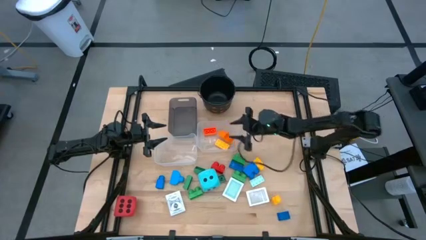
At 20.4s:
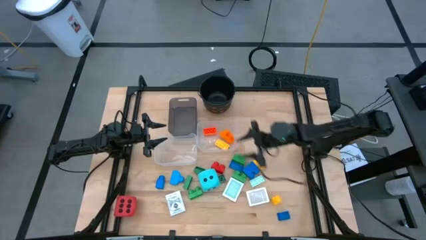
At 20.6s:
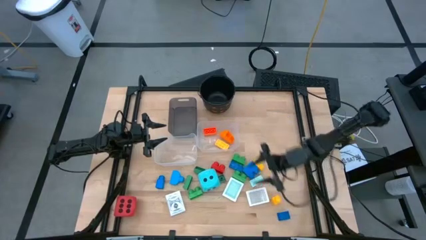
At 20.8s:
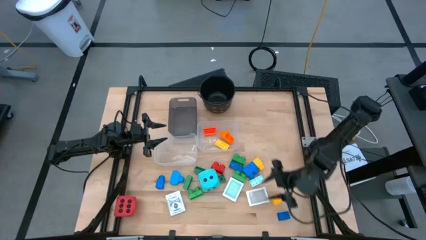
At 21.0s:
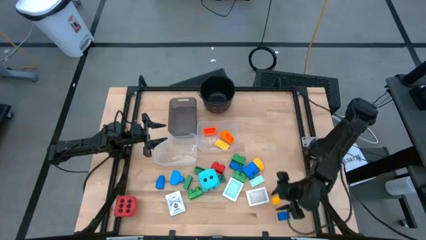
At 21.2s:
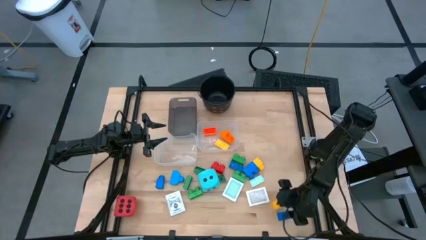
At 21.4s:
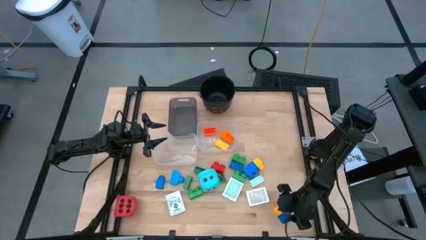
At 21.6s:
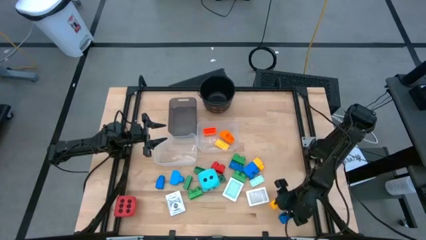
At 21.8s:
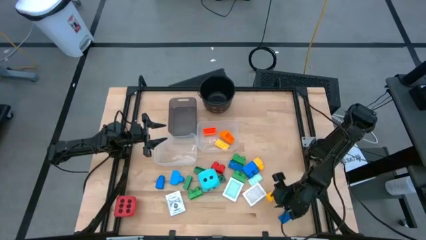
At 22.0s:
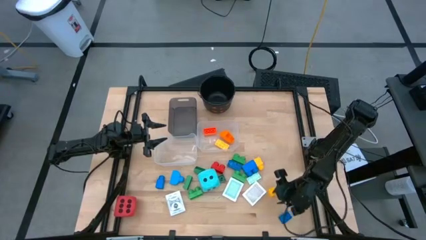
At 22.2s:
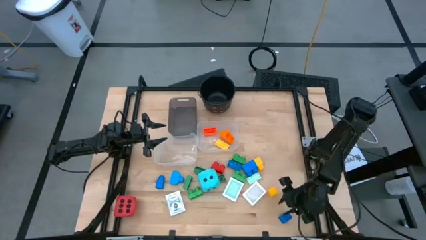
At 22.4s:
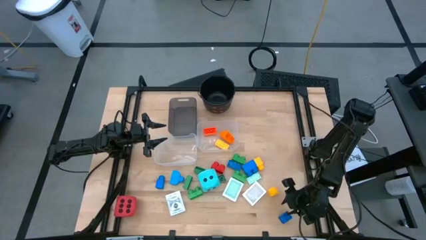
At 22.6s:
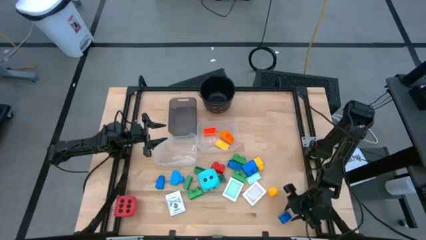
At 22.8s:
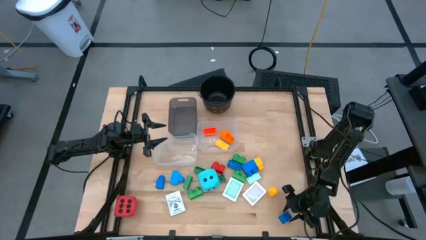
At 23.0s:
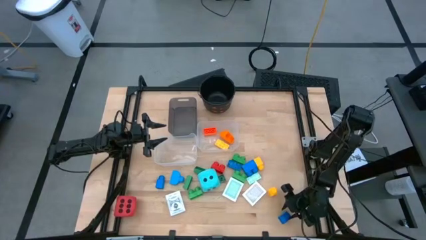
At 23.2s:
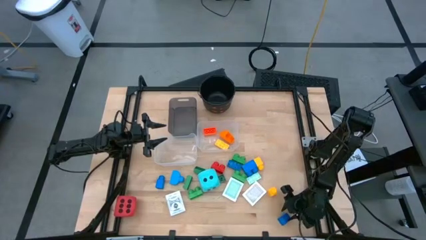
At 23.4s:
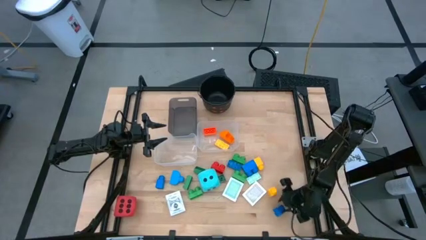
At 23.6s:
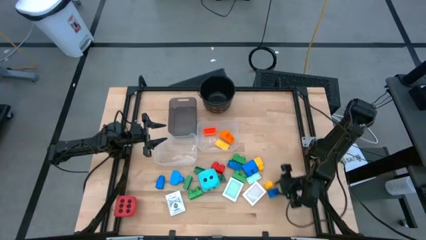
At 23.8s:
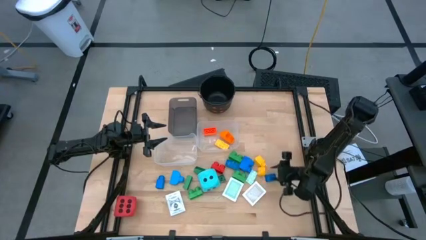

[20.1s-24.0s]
Task: Pick & Place Toys
Adjust the game piece on the table

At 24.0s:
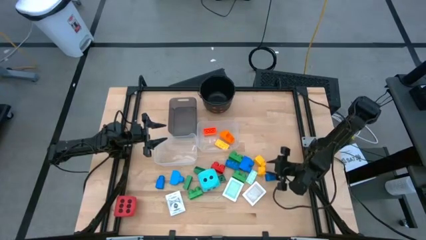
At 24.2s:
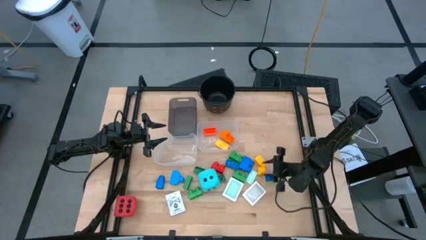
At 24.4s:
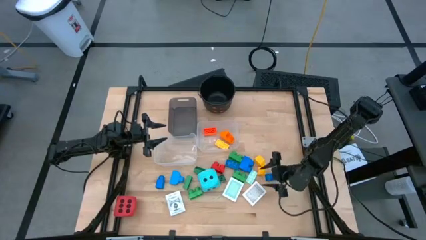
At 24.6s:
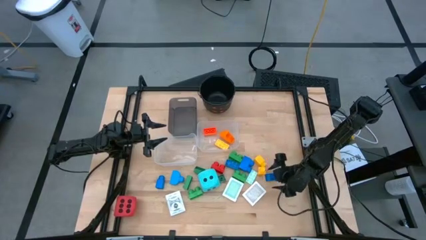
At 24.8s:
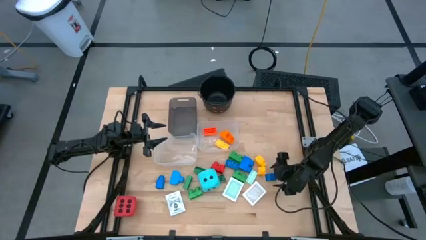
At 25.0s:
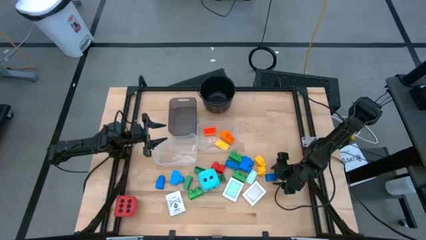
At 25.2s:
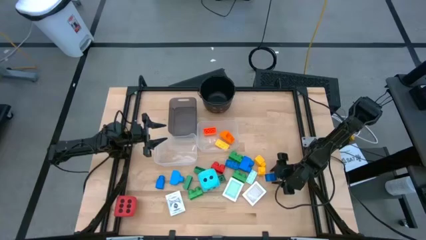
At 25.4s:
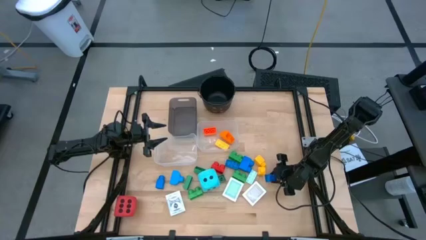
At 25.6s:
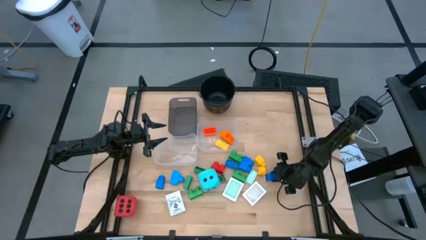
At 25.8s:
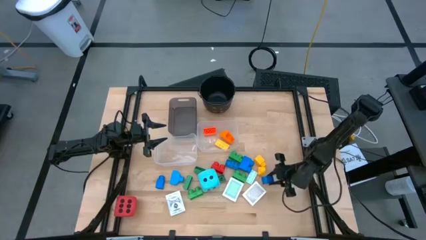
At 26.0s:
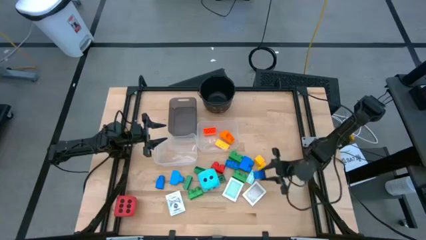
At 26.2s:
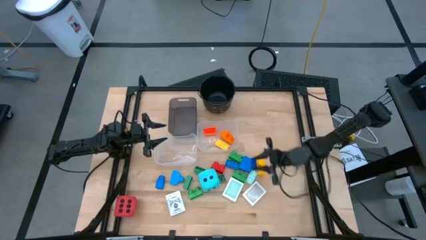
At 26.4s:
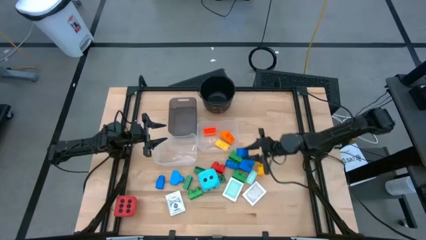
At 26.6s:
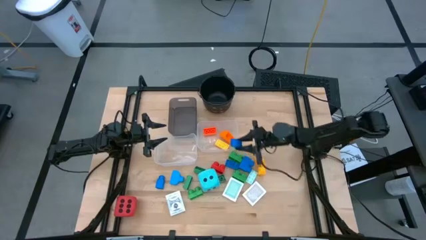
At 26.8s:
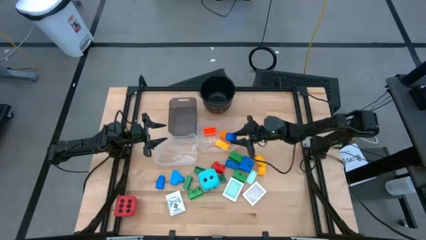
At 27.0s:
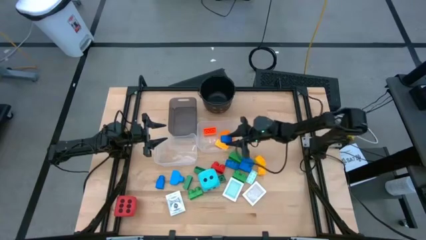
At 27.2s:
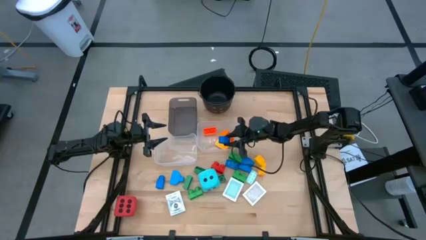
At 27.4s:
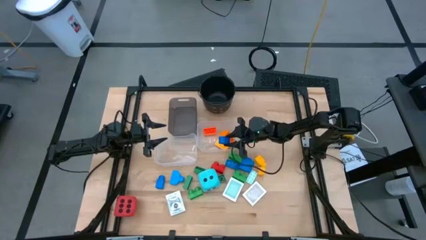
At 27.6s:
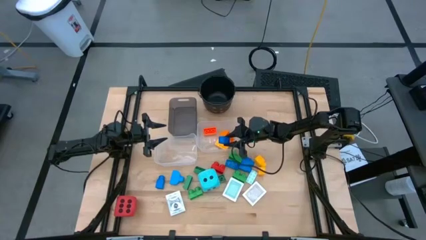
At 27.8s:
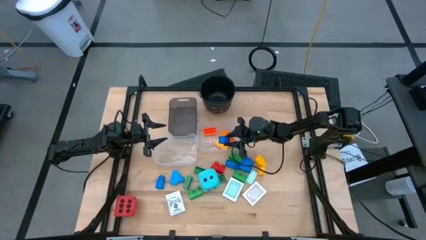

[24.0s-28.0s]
Put the blue game piece into the right transparent bin

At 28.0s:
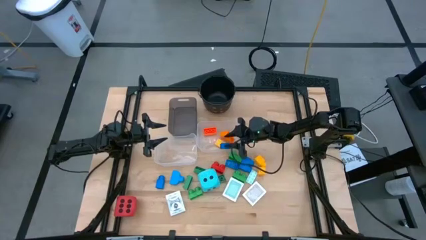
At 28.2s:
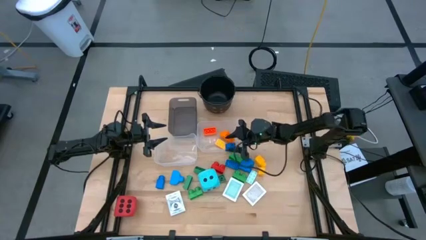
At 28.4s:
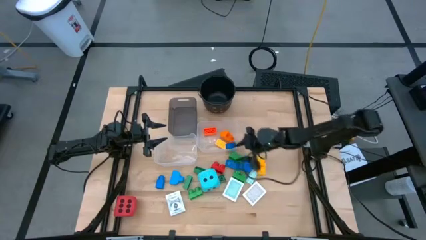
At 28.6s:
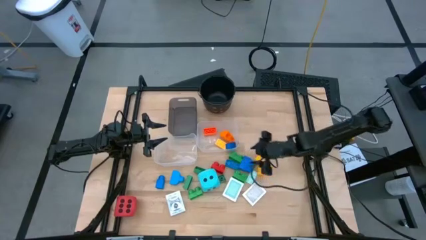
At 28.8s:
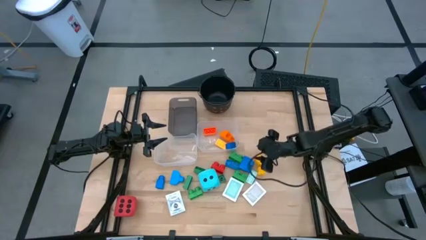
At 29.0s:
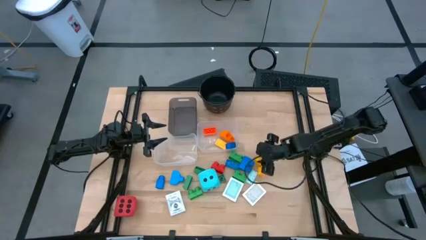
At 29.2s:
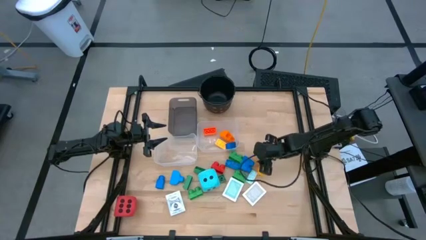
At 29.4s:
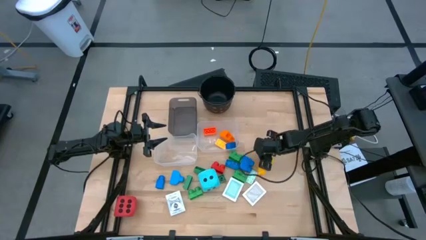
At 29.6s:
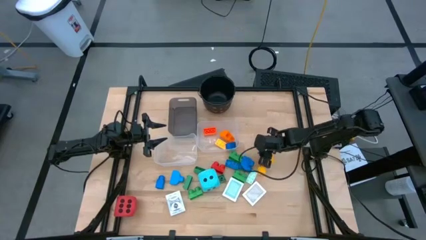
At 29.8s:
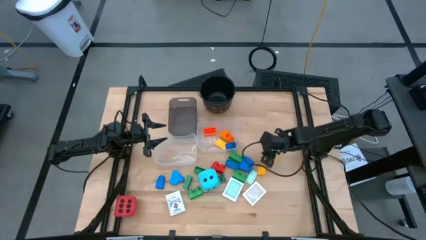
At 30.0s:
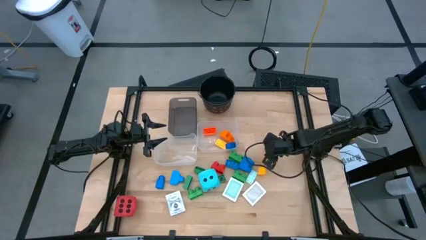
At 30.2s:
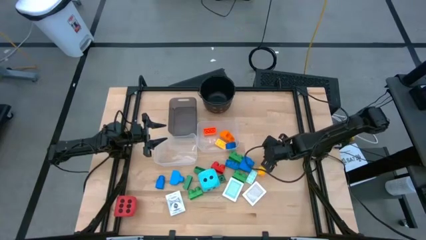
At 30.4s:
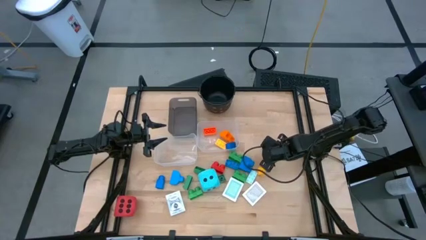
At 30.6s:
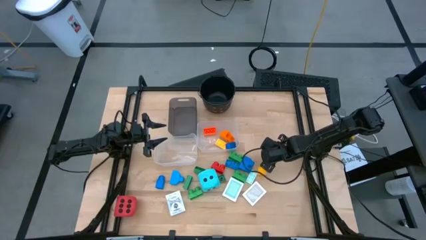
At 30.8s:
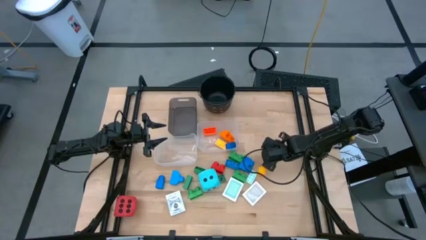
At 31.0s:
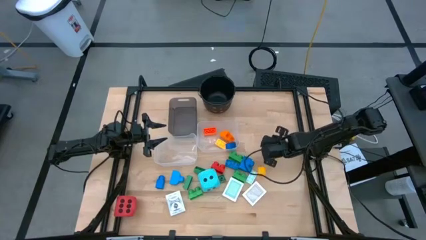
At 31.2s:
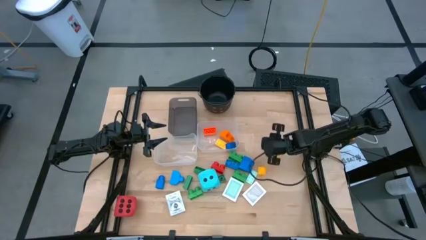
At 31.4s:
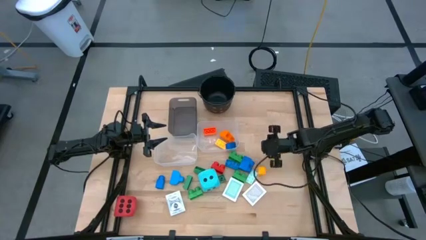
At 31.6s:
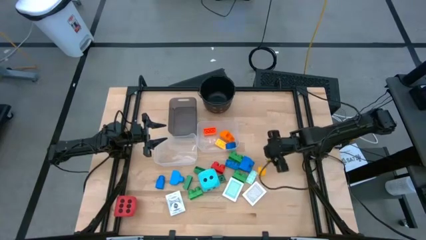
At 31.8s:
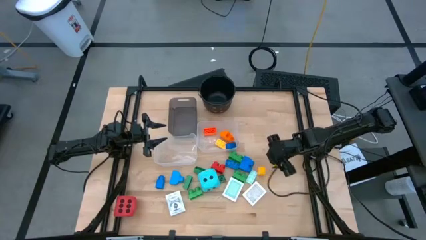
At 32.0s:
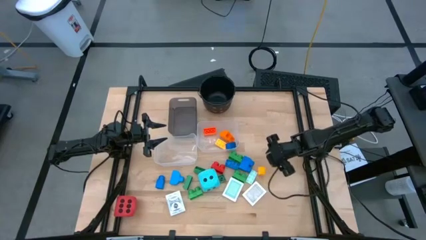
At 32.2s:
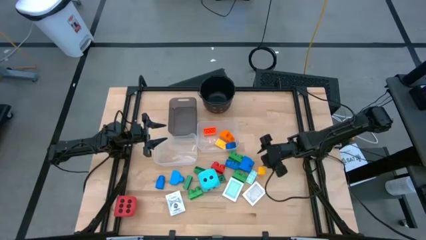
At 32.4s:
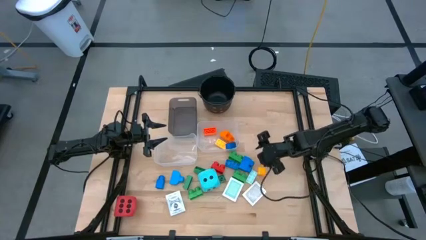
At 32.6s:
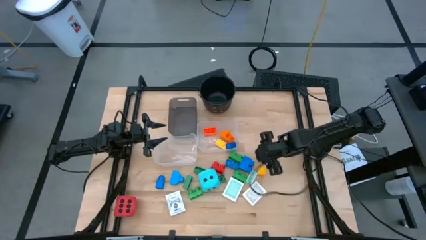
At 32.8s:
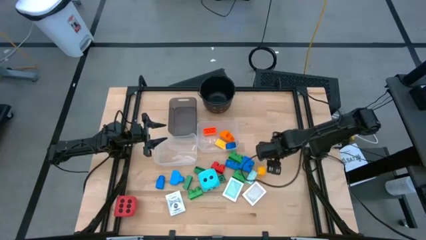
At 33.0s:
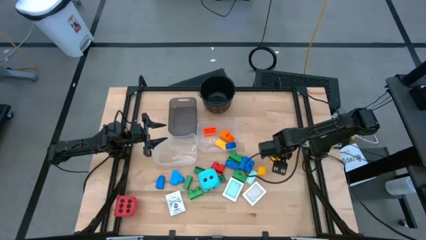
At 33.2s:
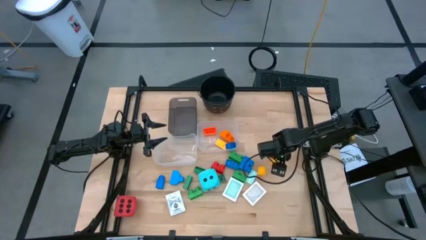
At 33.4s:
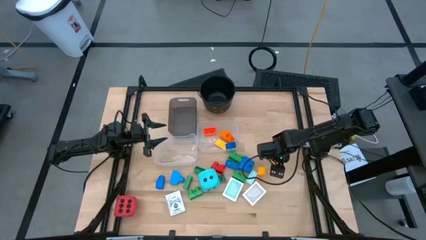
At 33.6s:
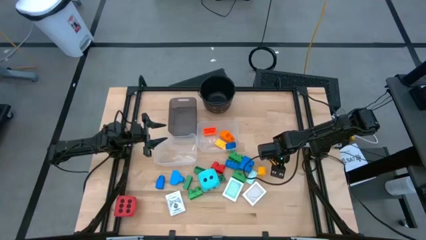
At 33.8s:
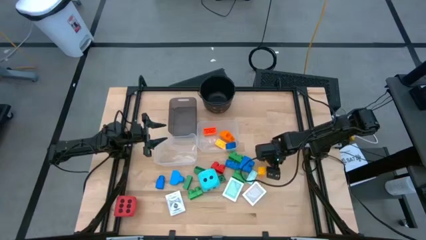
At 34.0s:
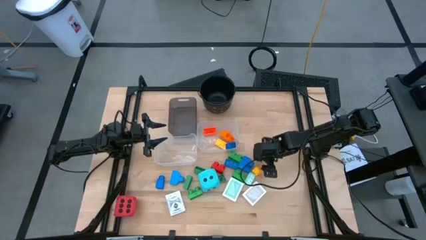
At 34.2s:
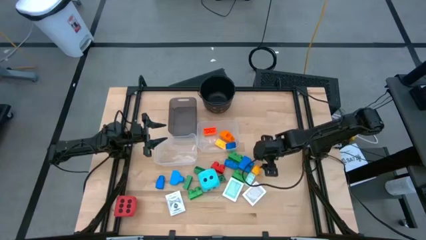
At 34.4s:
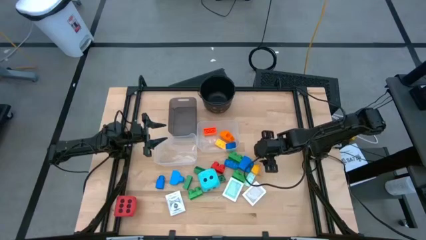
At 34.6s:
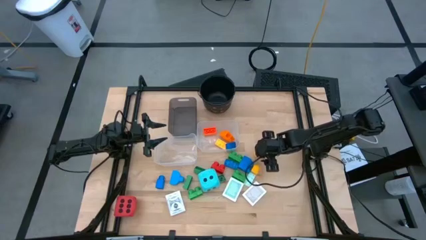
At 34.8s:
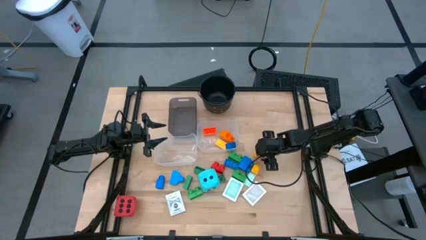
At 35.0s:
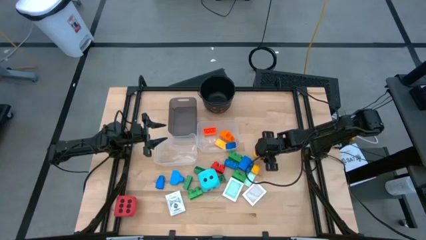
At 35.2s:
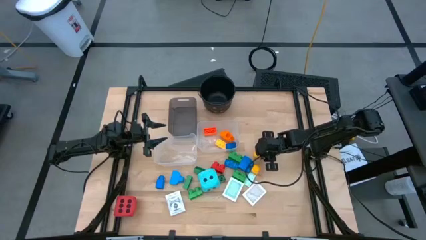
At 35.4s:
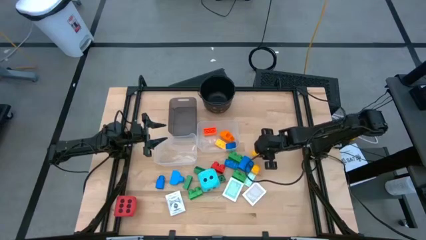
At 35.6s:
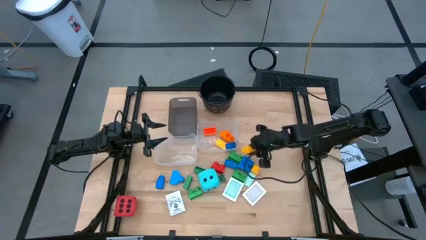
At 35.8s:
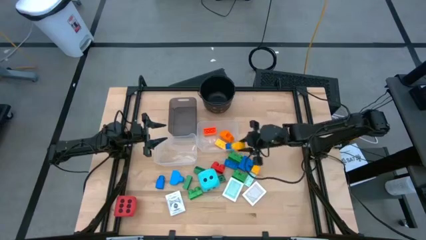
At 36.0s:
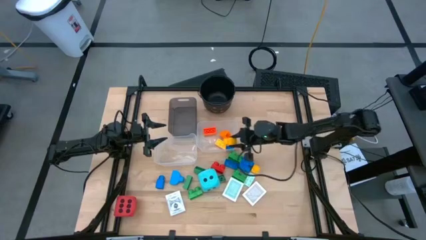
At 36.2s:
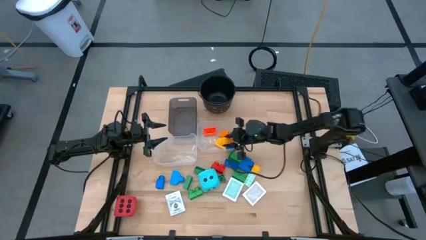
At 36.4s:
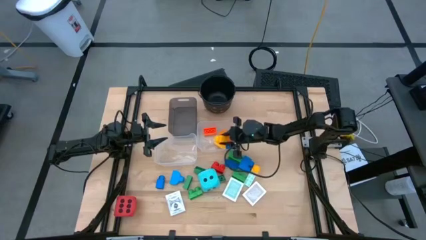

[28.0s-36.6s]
Put the yellow game piece into the right transparent bin

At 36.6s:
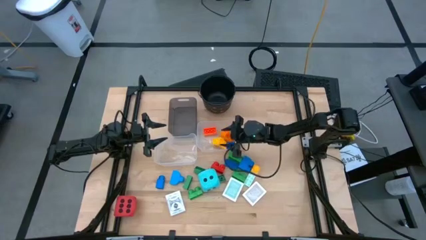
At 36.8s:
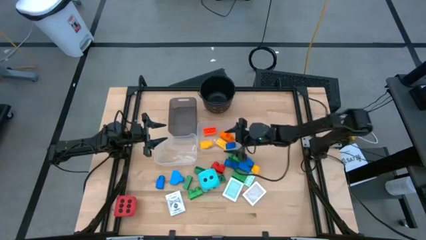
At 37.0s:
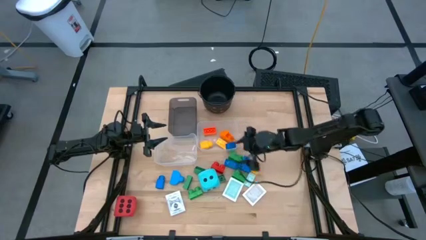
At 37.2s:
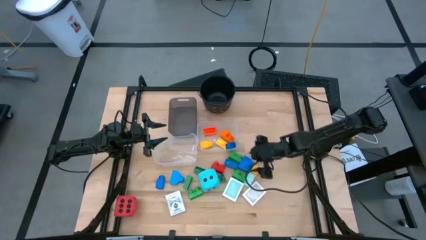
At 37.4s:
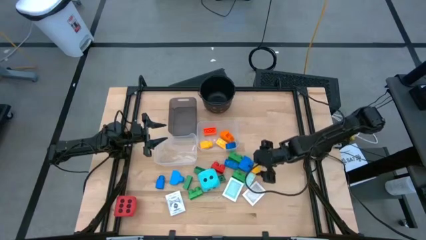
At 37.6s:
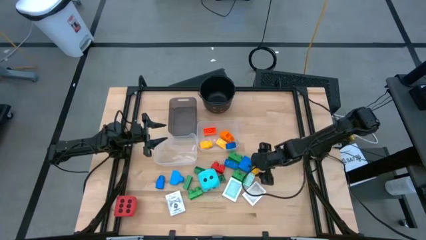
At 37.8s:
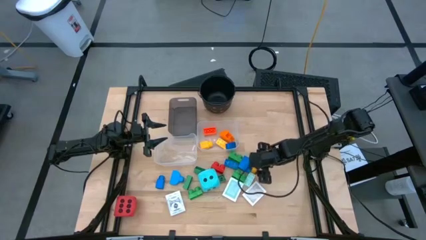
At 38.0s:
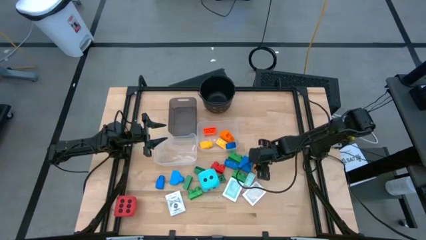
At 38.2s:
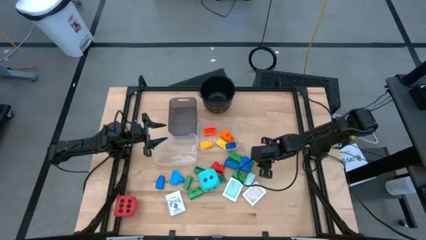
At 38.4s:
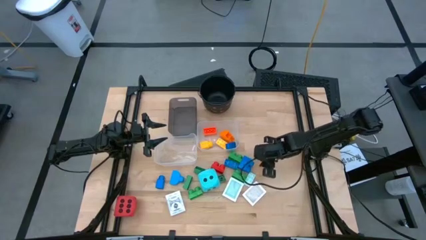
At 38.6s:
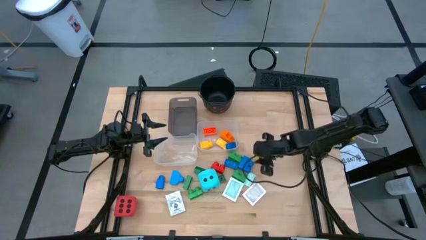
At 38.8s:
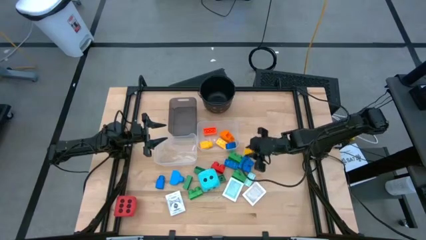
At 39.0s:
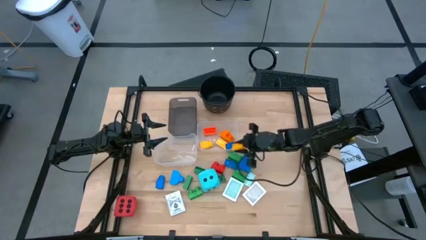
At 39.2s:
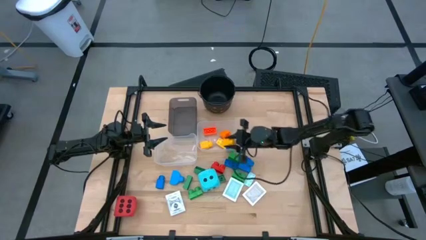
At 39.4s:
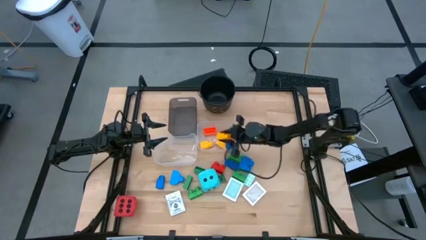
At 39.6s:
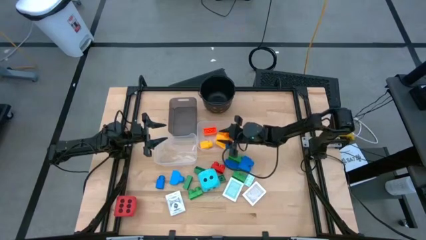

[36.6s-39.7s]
Put the yellow game piece into the right transparent bin
